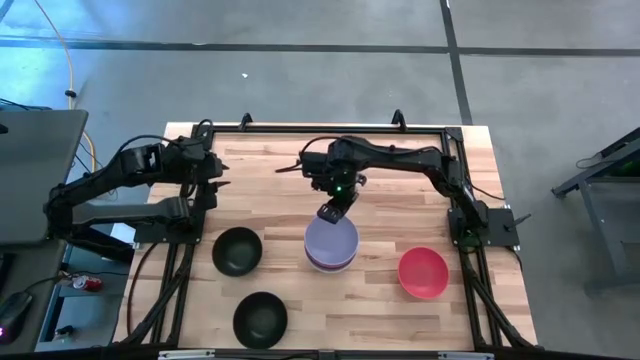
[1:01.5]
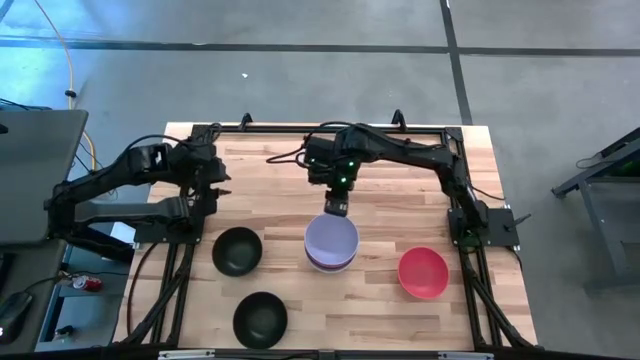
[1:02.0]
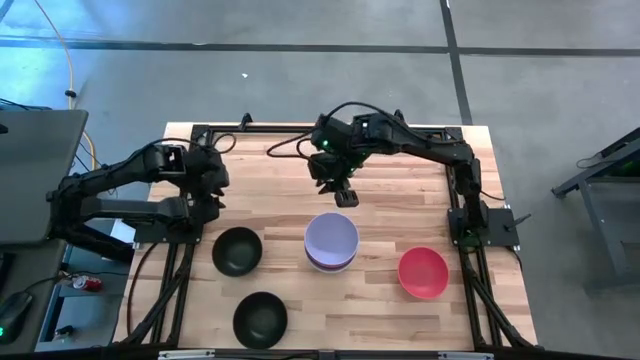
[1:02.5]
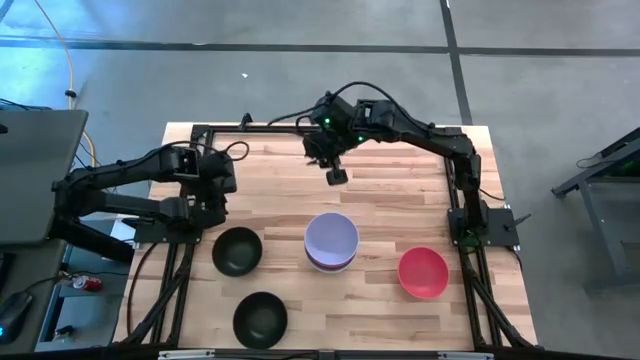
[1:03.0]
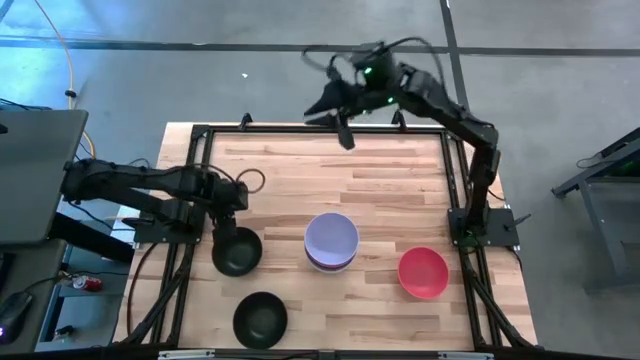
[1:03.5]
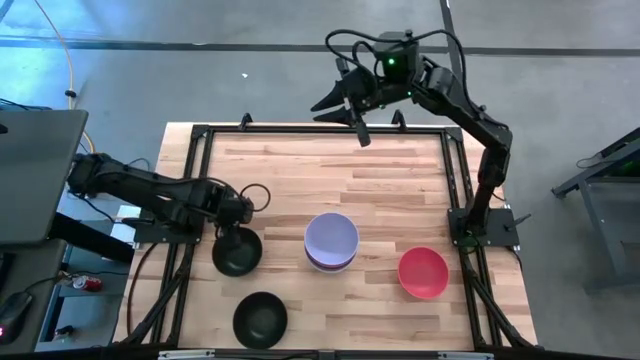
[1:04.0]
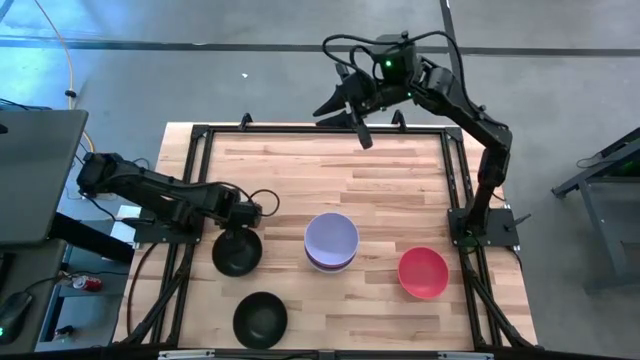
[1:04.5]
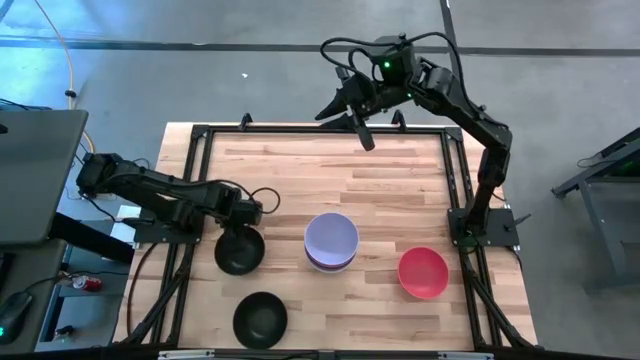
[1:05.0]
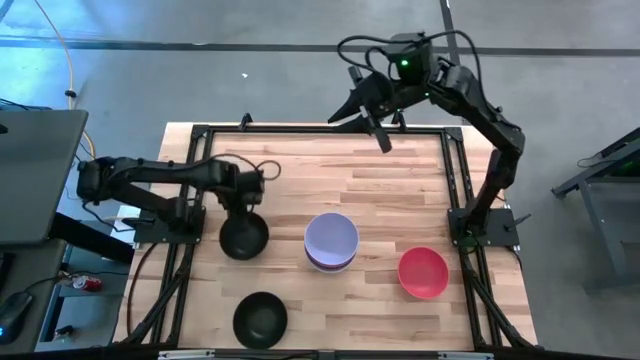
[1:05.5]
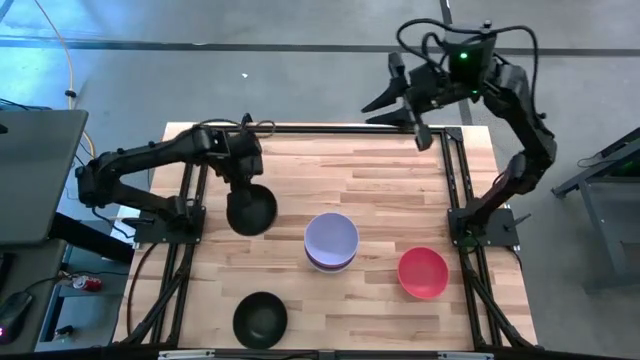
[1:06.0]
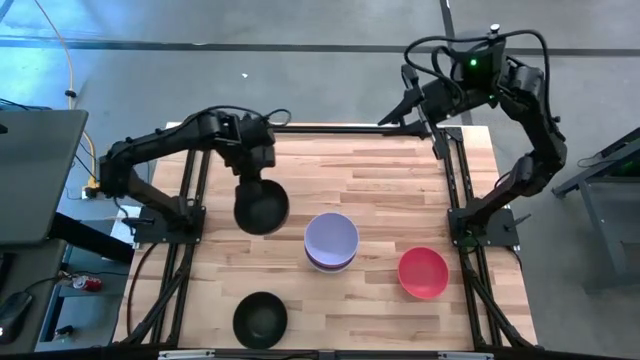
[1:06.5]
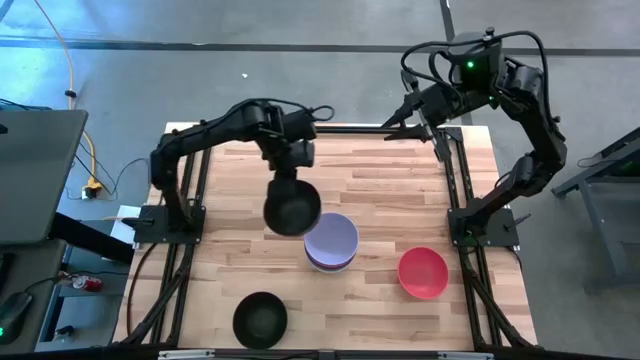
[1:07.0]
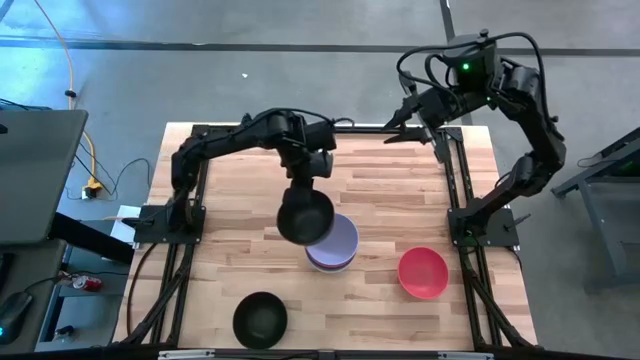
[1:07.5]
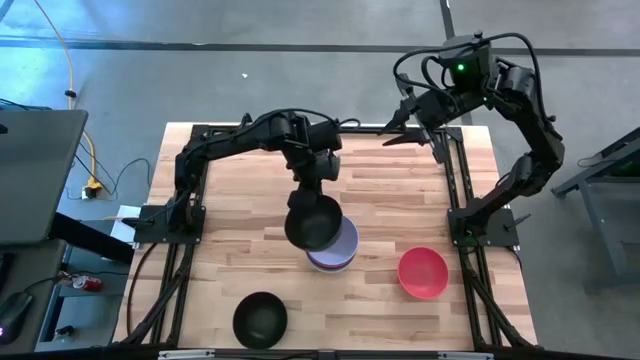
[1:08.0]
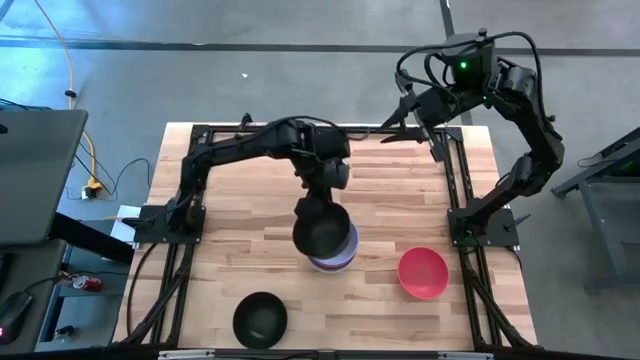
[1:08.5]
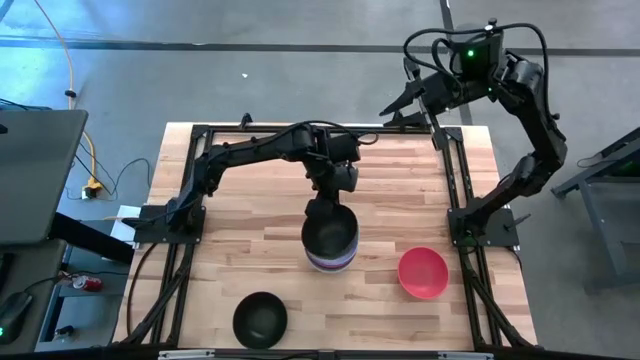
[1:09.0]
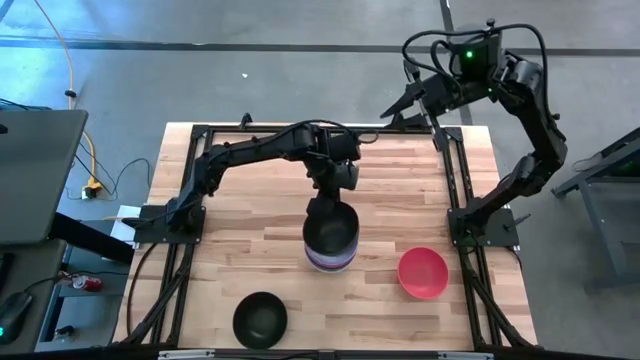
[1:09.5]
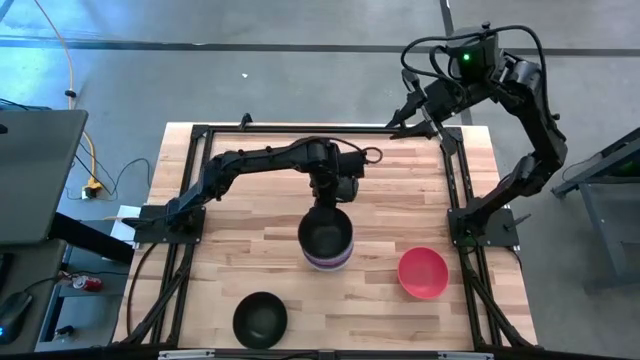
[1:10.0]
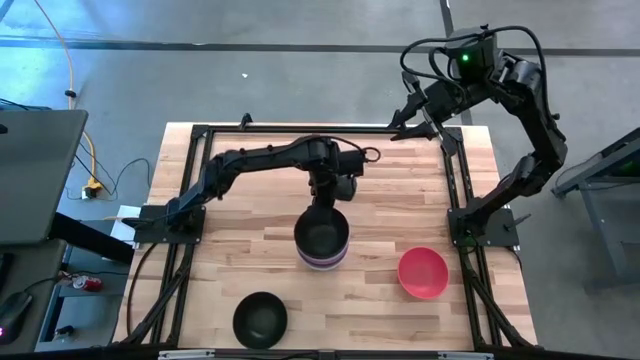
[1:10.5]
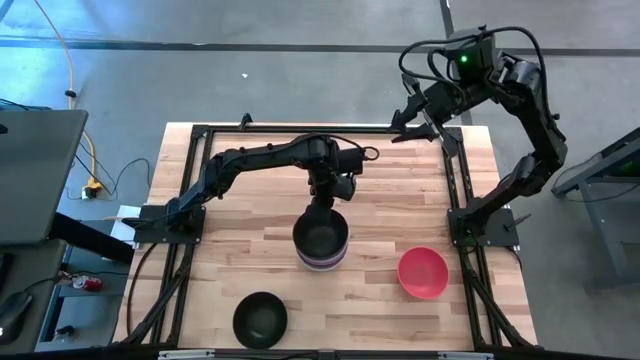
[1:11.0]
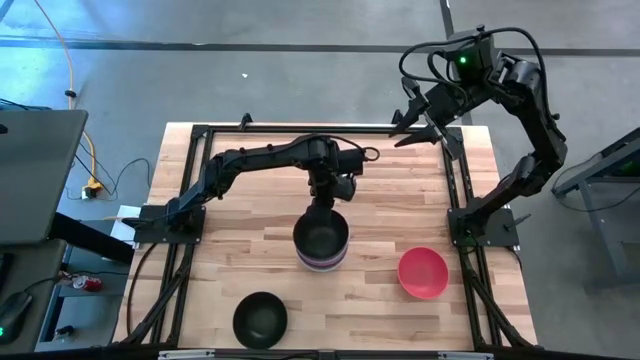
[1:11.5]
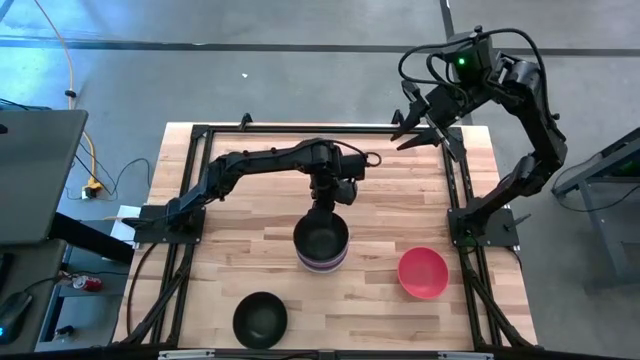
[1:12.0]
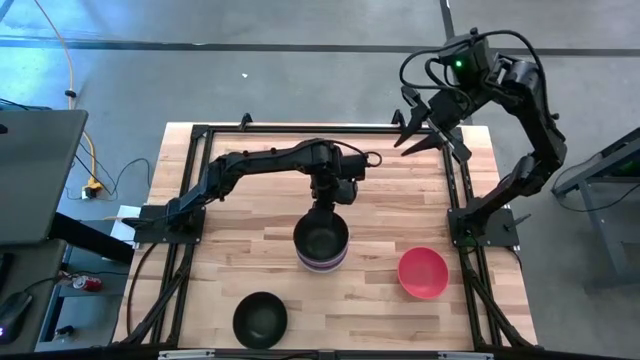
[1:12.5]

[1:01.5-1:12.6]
Task: Nest bowls inside each other
Stack the top black bowl on top of the light violet bowl

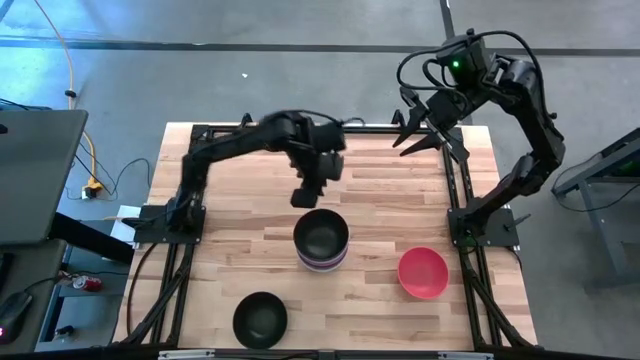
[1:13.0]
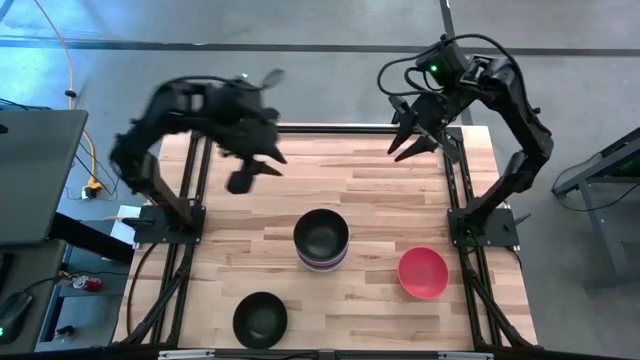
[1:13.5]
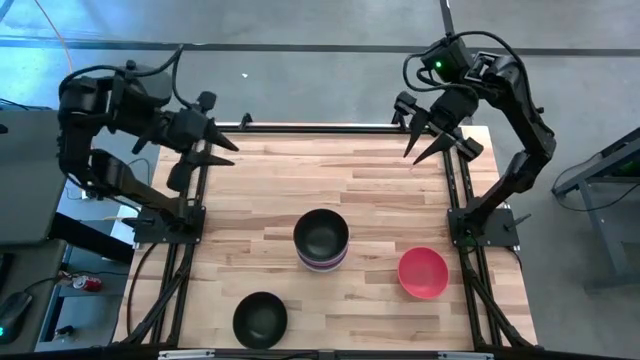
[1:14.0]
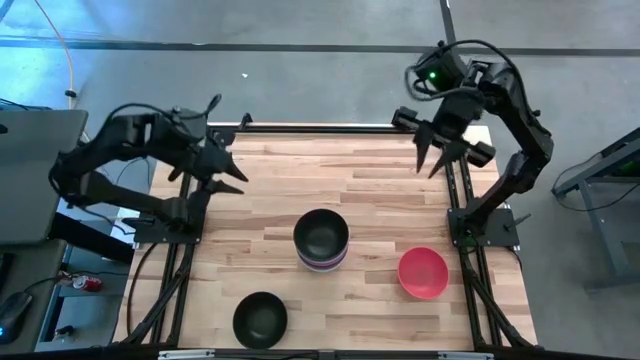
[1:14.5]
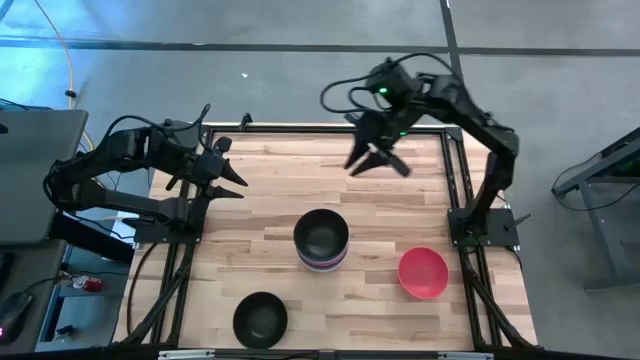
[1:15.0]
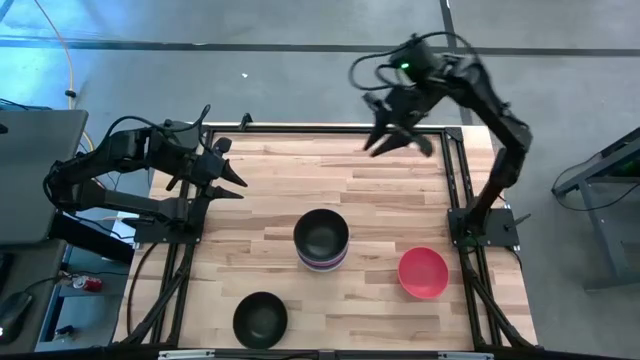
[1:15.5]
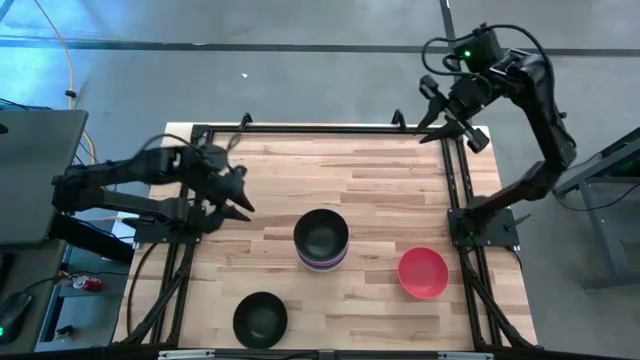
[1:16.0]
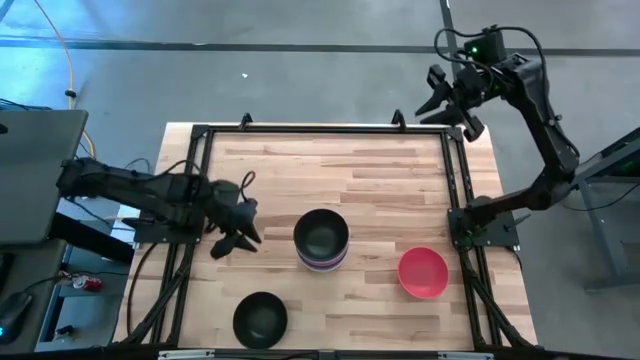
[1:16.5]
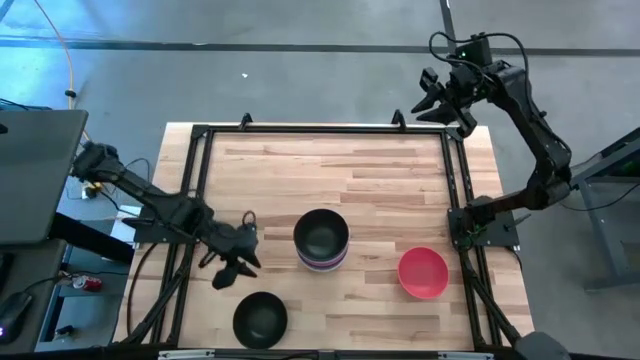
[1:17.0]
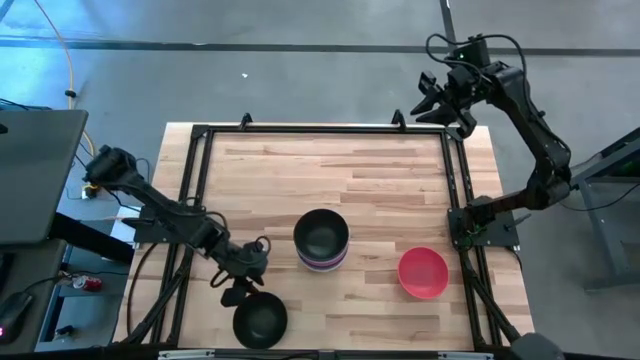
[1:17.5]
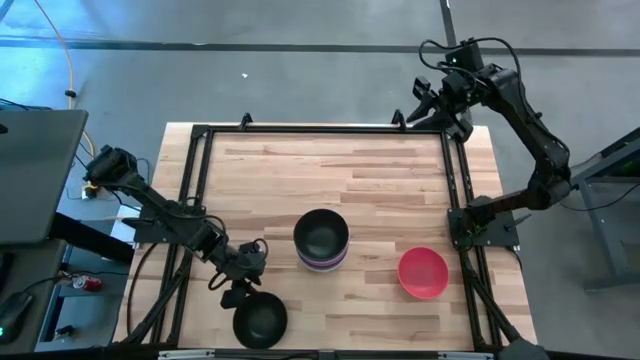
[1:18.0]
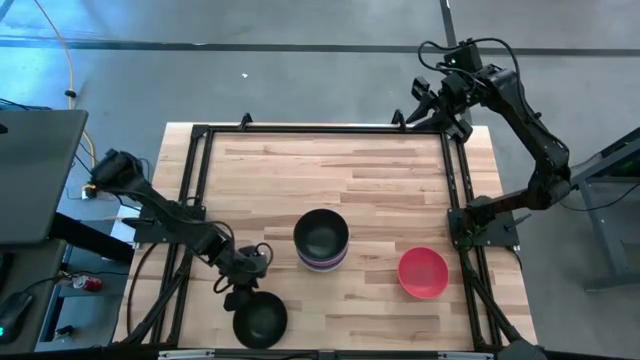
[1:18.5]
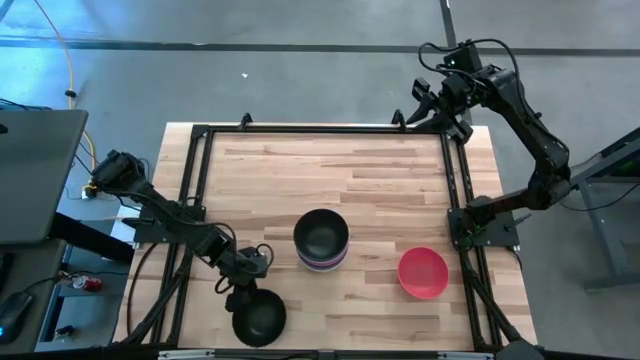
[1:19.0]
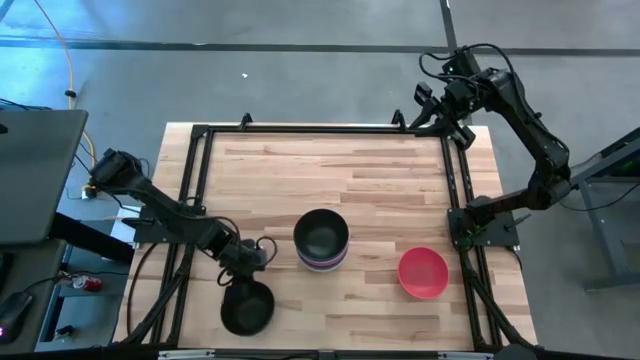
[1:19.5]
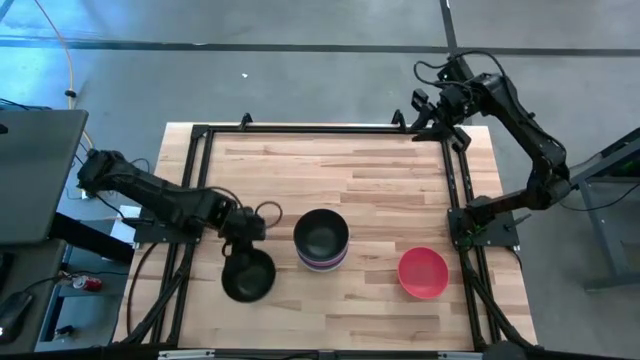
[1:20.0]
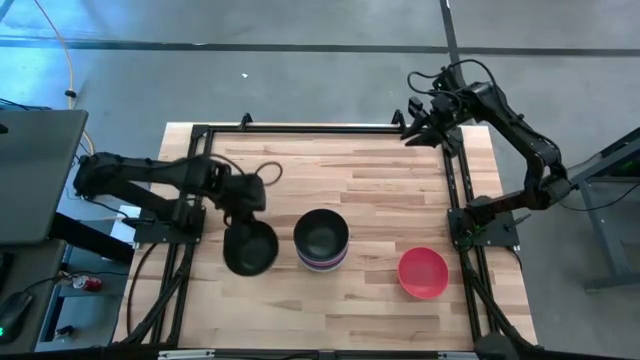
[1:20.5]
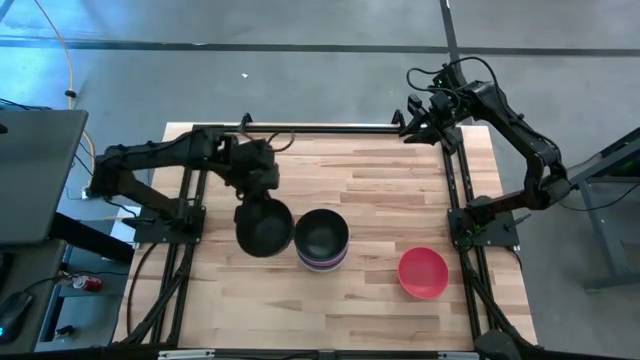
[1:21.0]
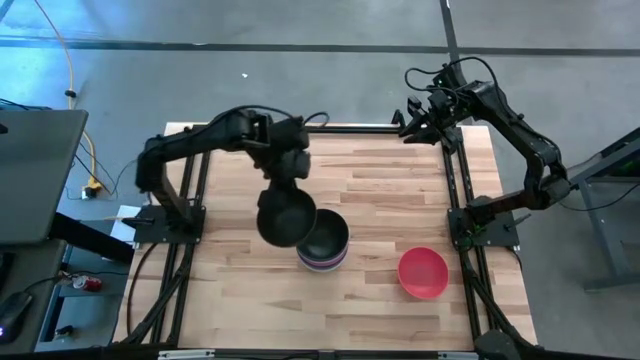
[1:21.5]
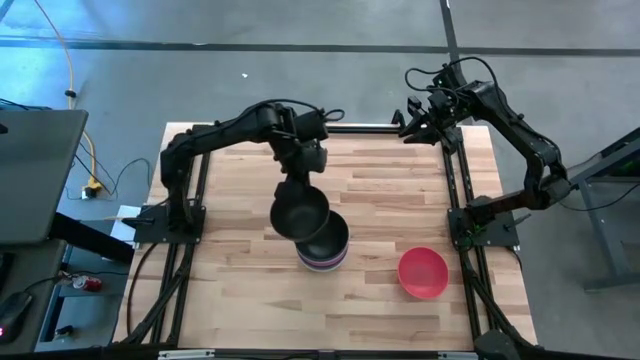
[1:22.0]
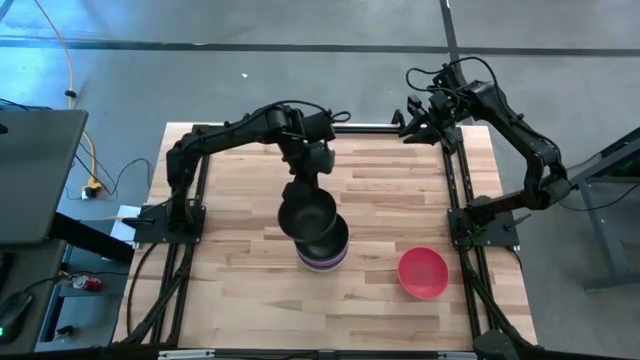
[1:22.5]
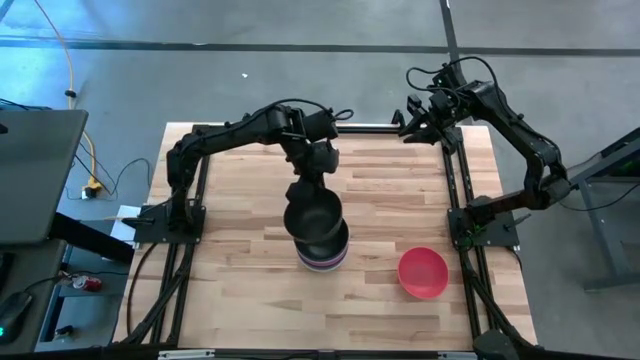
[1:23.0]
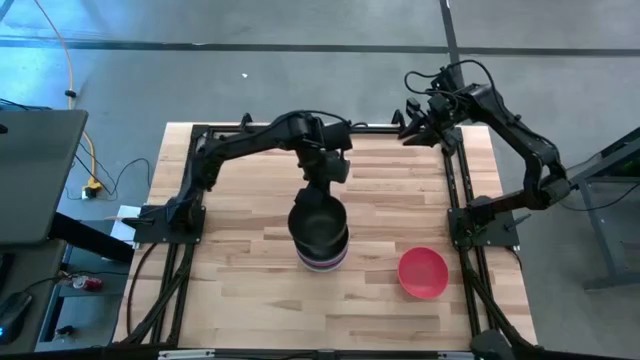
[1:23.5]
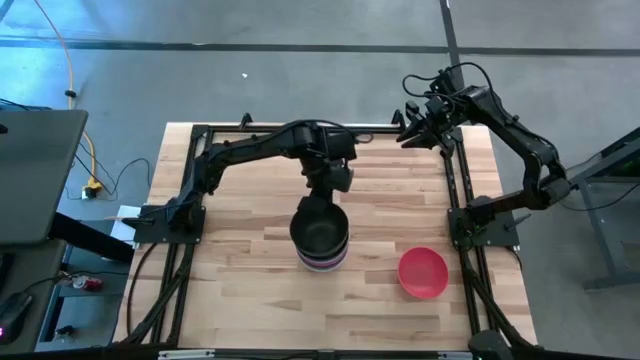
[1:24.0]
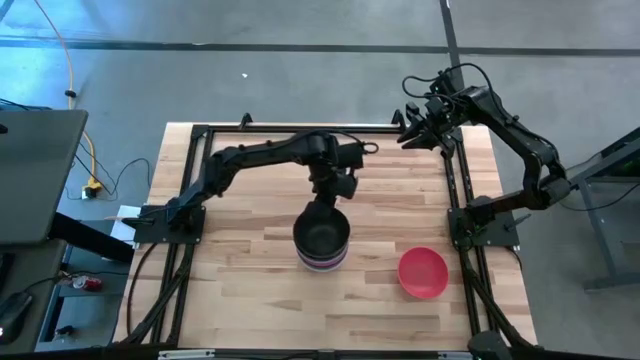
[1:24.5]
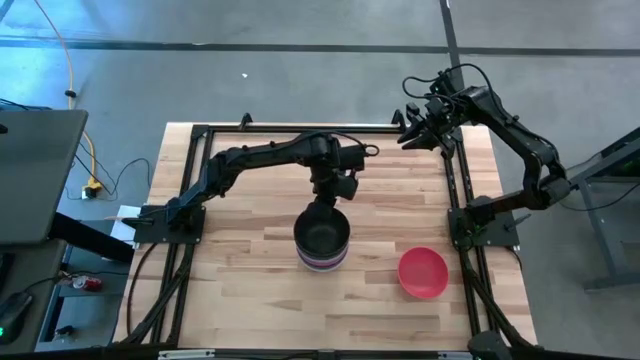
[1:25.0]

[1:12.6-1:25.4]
Stack the black bowl on top of the black bowl
